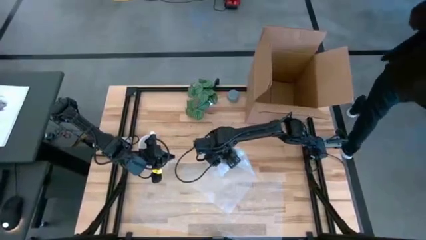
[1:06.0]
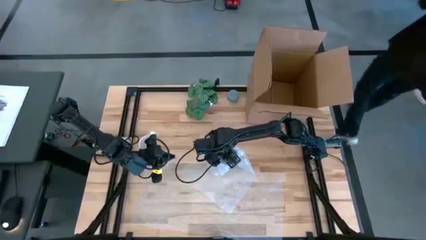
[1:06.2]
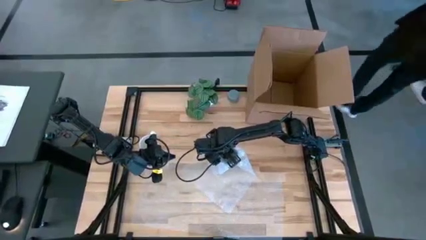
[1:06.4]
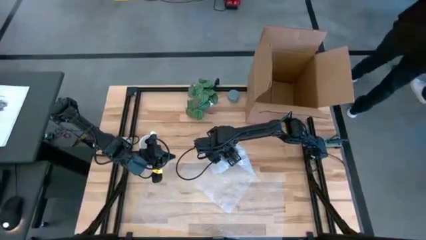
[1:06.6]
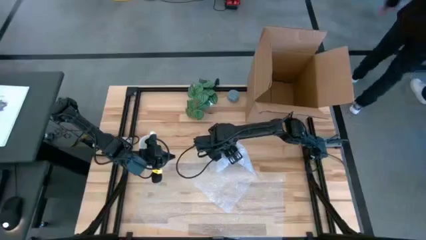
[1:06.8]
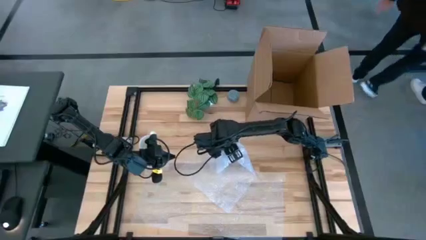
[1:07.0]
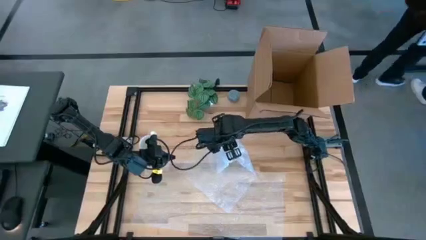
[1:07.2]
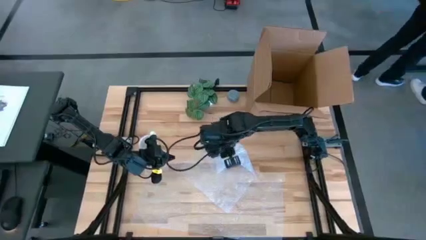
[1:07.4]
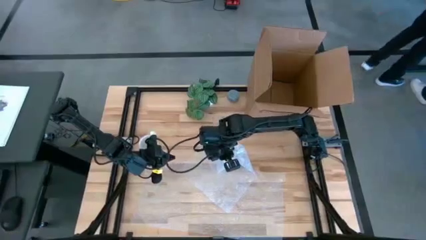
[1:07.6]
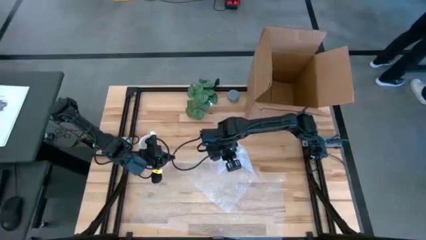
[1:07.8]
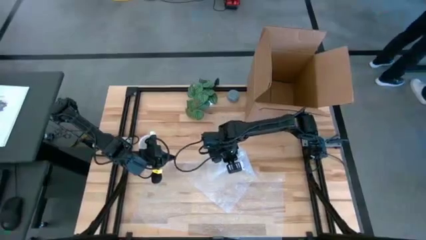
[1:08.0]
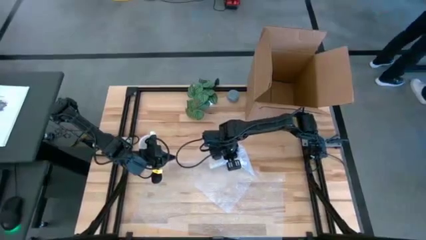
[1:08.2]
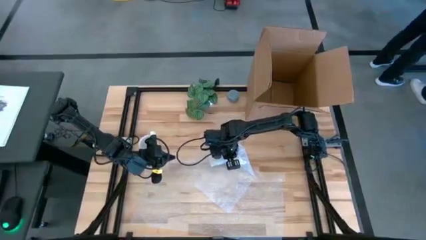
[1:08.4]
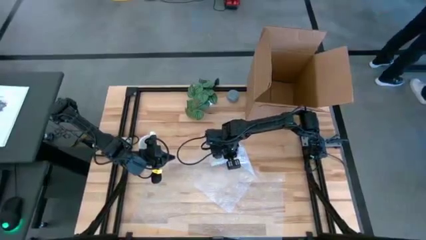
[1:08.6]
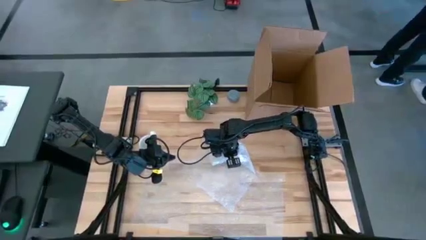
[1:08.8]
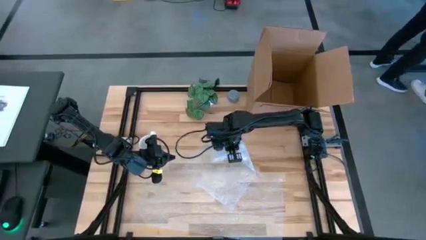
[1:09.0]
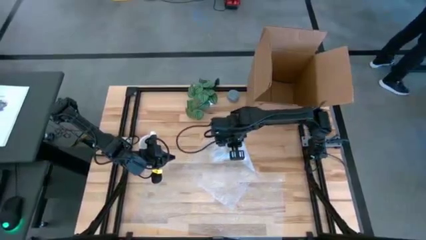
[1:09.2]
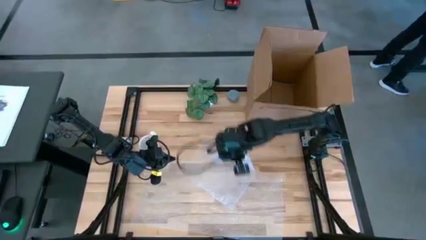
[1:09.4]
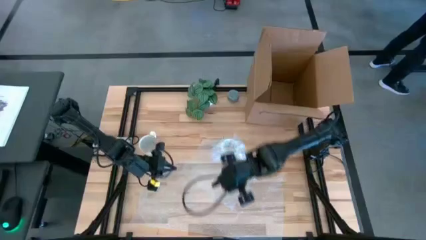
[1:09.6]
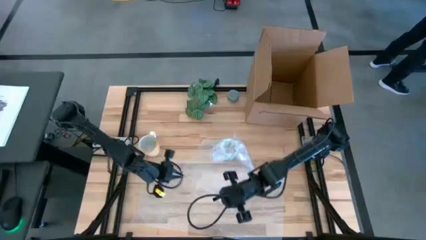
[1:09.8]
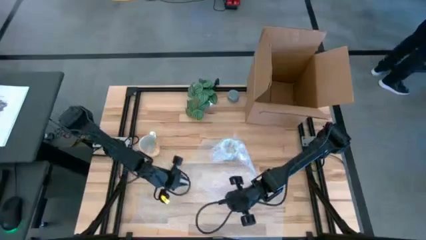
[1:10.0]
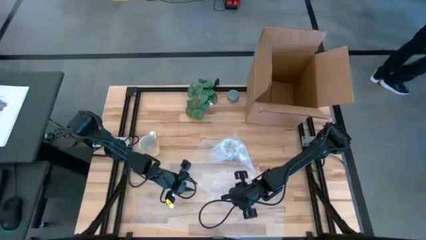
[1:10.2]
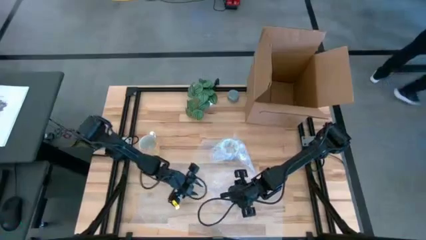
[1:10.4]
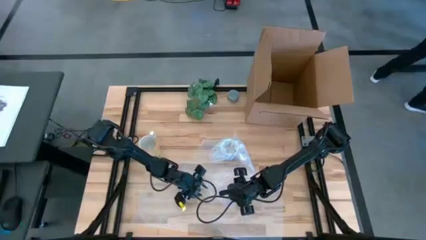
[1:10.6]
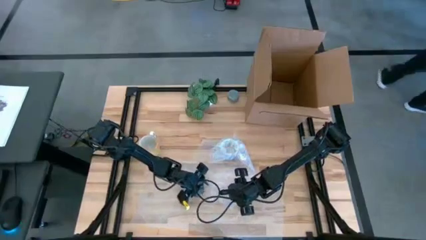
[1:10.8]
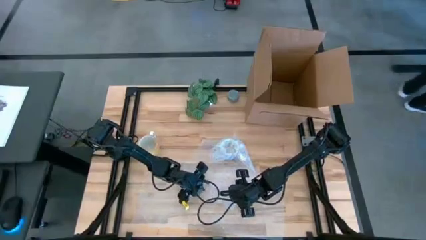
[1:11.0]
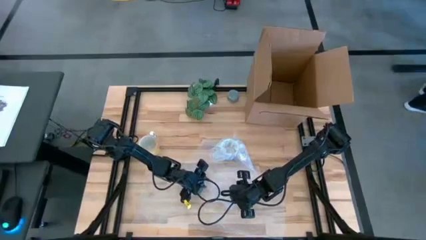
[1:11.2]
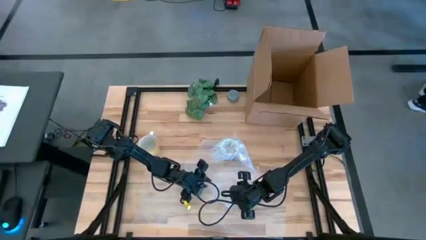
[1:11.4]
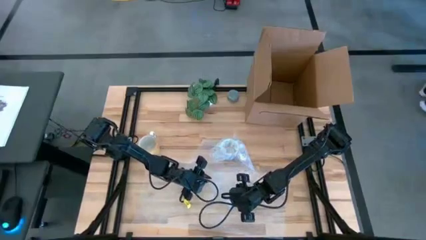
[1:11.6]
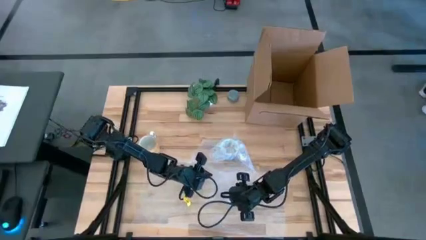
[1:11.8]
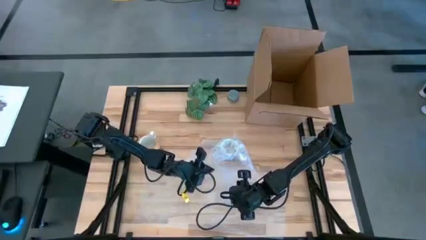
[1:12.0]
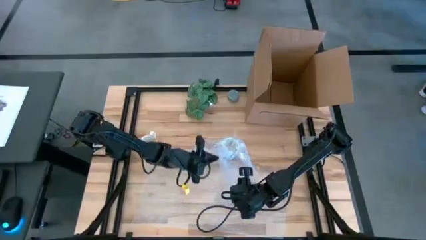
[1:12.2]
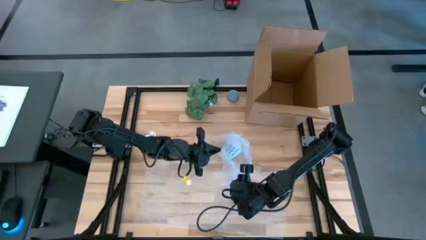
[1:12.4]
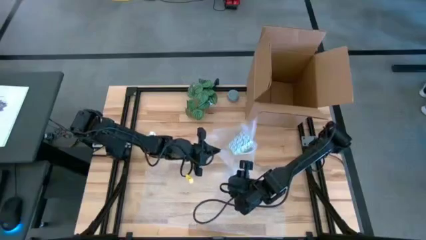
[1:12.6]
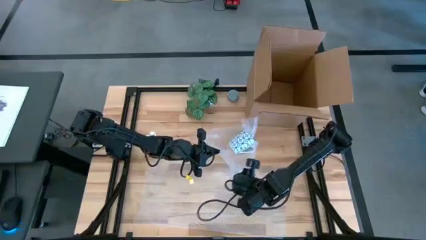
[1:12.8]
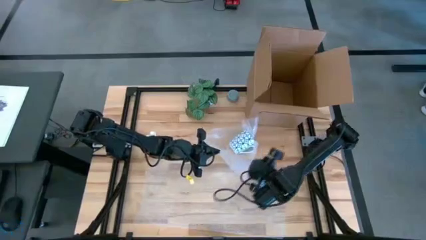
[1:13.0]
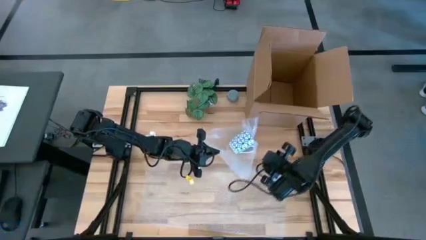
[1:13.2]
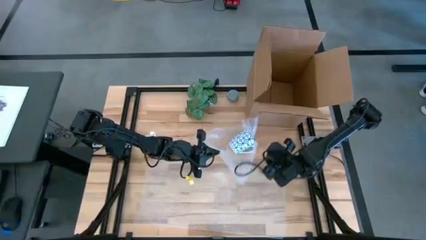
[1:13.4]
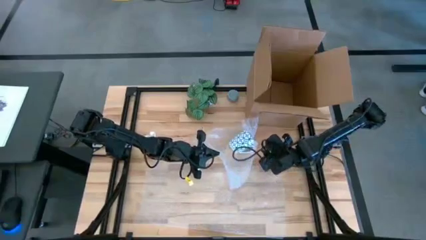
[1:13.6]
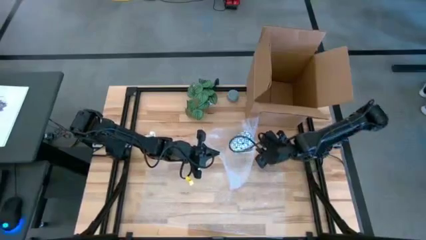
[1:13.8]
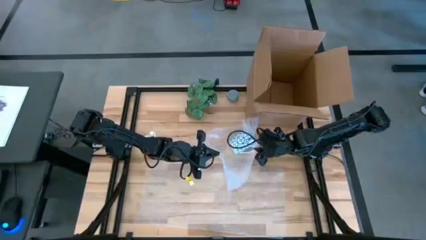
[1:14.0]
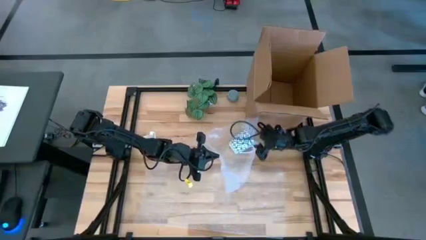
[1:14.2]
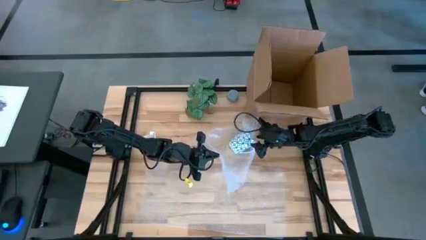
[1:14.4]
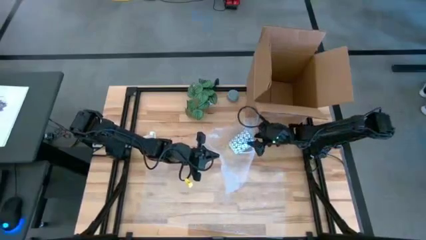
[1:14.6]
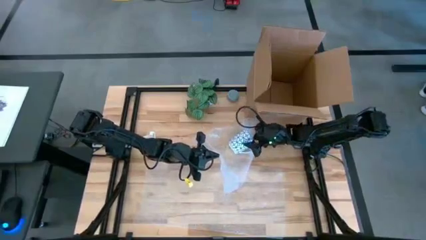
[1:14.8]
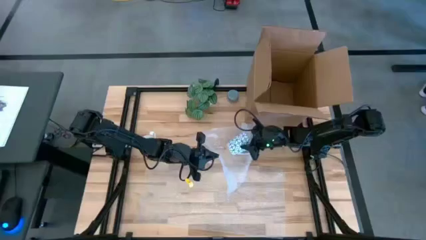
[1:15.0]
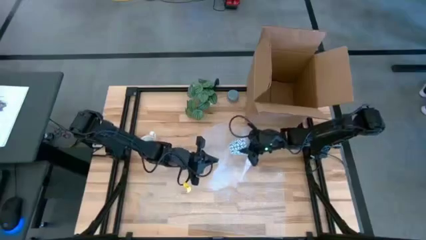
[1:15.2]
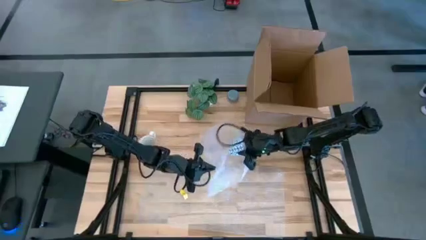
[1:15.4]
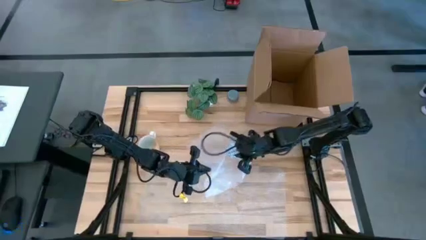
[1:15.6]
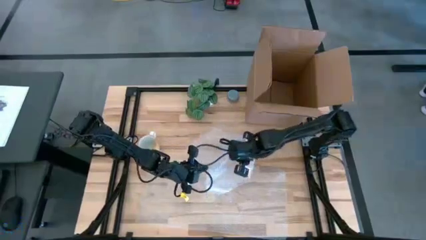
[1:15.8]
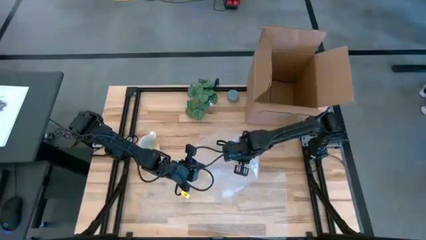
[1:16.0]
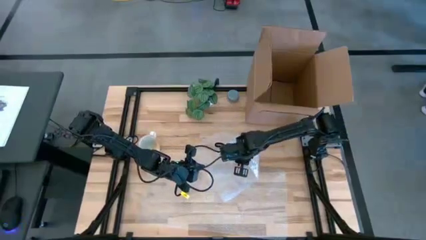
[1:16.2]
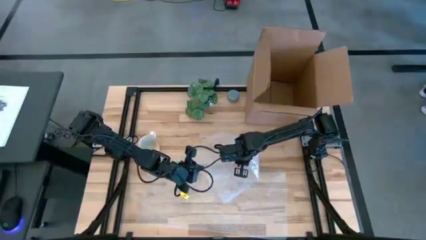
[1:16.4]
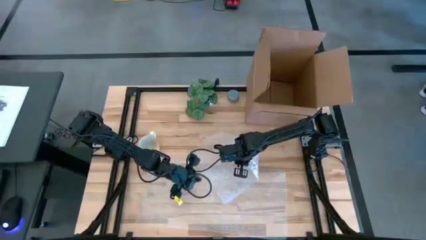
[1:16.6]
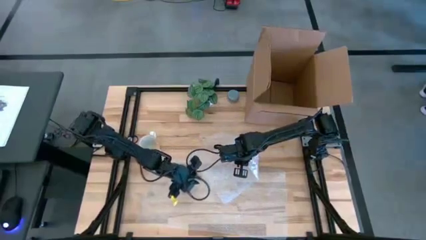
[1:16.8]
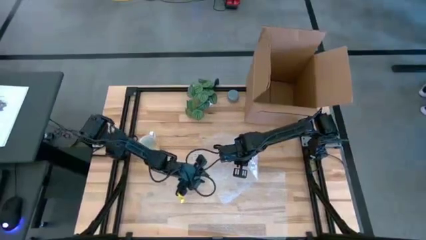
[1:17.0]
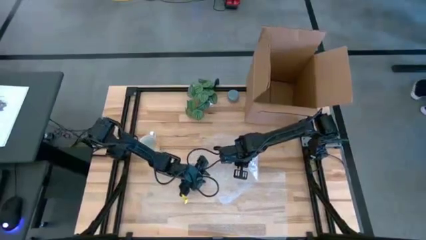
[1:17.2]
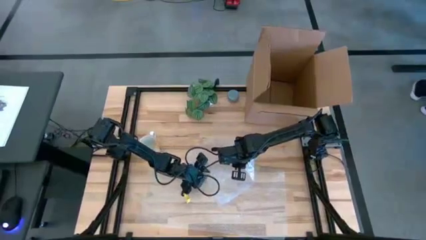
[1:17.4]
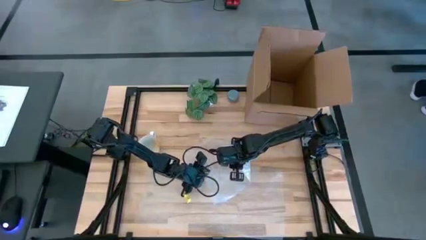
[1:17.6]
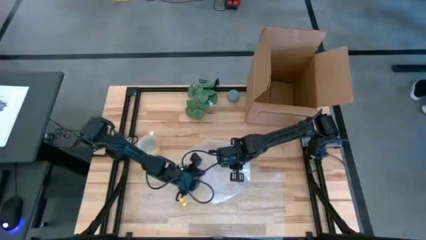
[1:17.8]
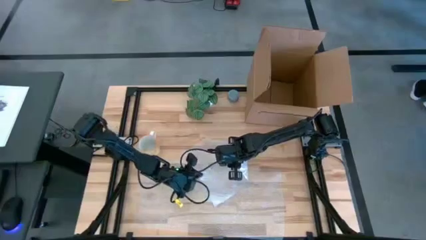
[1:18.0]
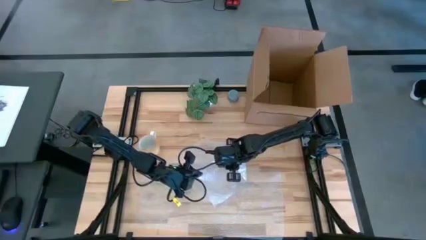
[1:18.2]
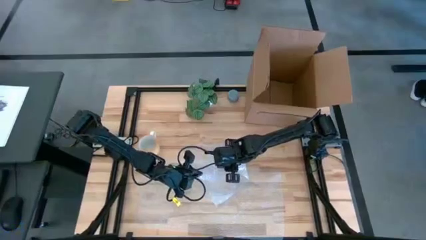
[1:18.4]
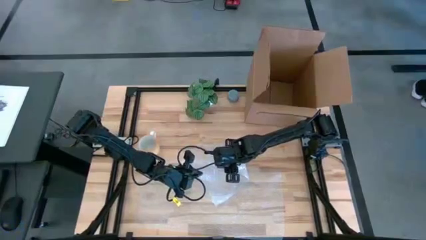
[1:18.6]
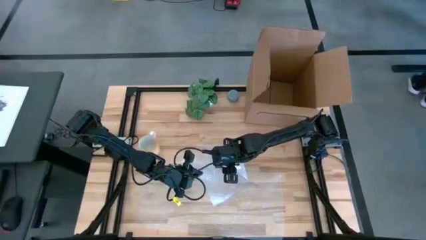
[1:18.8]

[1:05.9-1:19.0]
Task: wrap mug
Wrap the blue cup with the bubble wrap

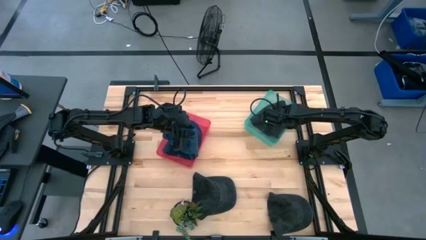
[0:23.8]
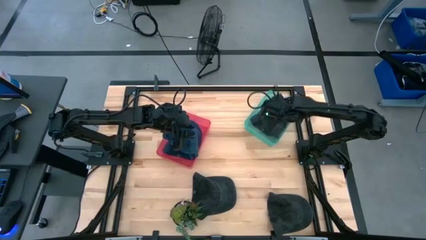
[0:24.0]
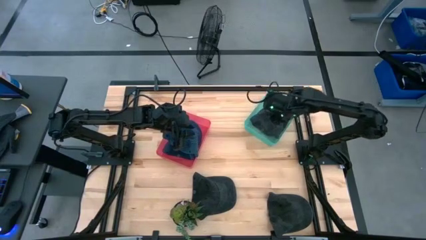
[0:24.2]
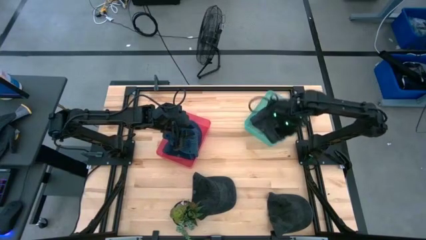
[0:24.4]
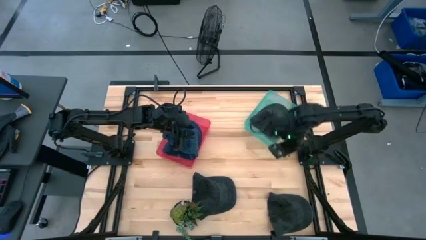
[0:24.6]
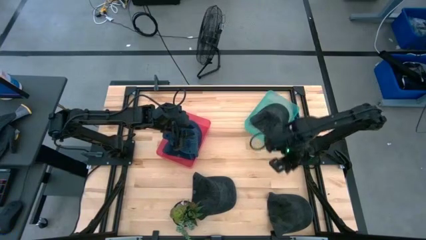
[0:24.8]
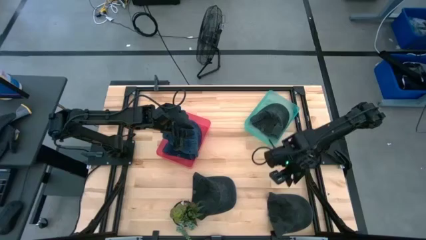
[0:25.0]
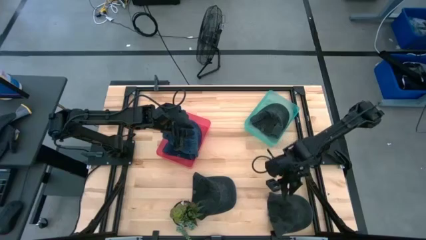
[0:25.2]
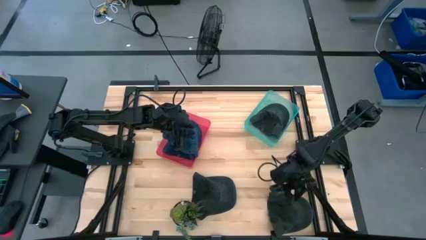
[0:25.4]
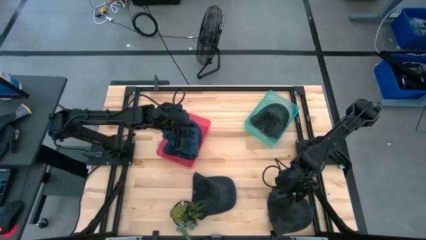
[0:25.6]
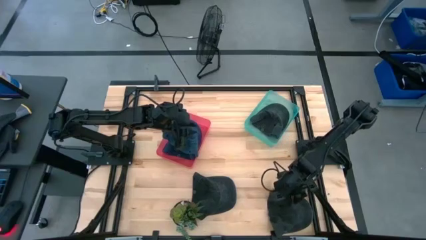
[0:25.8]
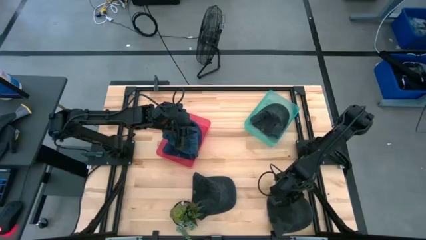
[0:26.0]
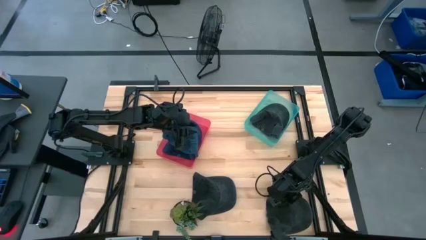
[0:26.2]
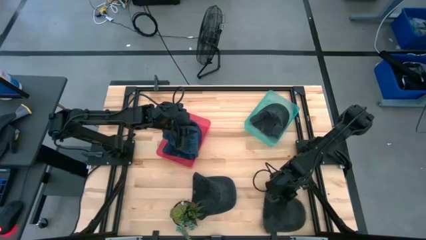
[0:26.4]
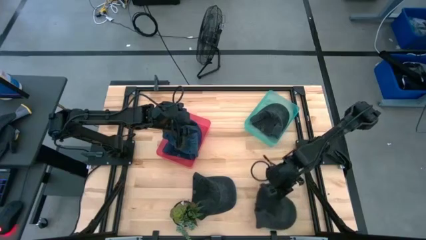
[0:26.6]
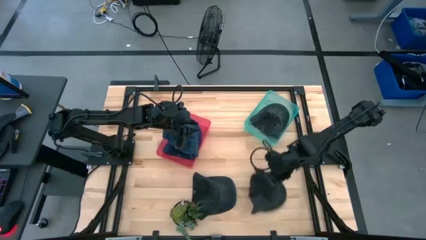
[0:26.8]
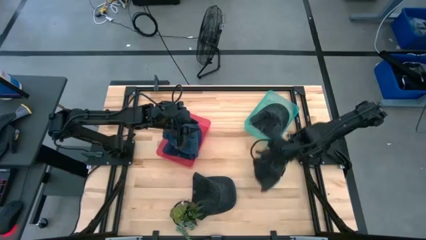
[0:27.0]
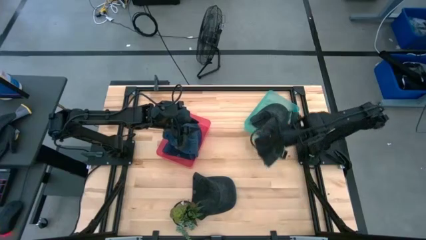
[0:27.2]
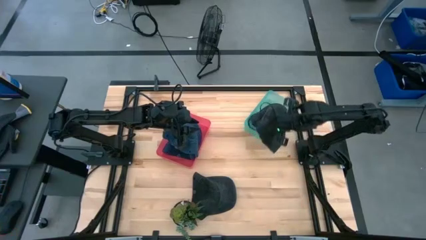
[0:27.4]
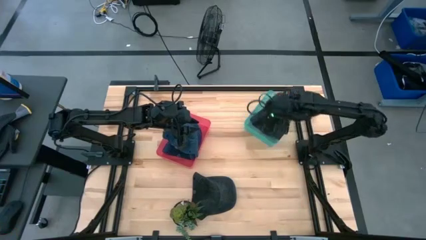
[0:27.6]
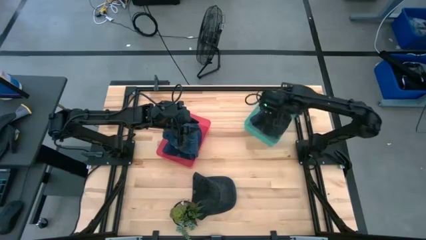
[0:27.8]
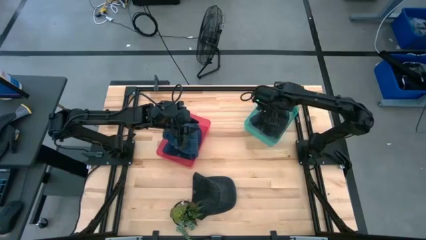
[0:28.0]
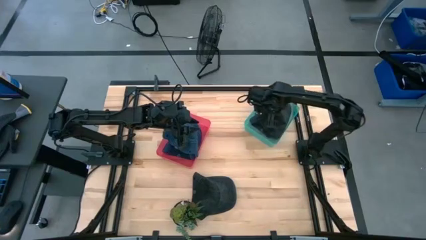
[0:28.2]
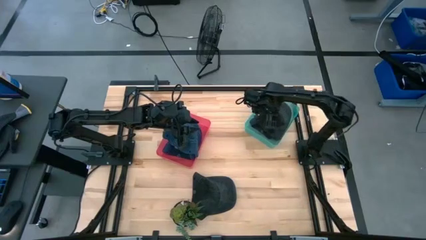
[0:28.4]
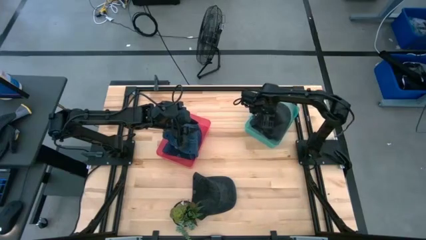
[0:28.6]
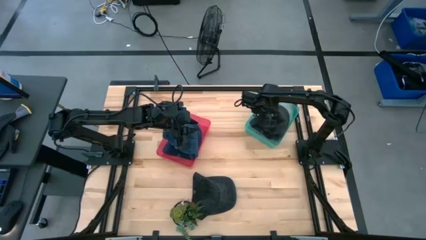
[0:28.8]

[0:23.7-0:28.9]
Task: Pick & Place hat
Put the right black cap into the green bin
